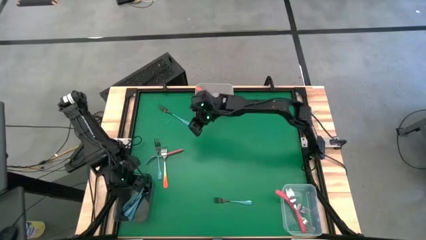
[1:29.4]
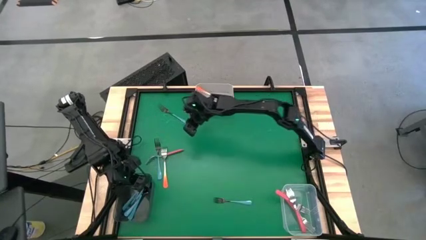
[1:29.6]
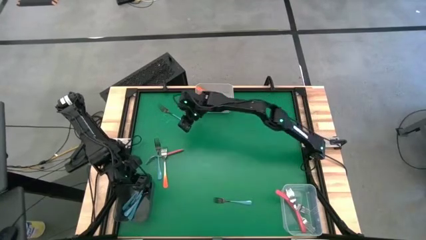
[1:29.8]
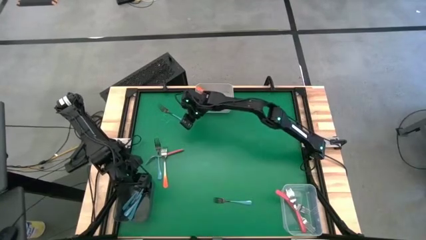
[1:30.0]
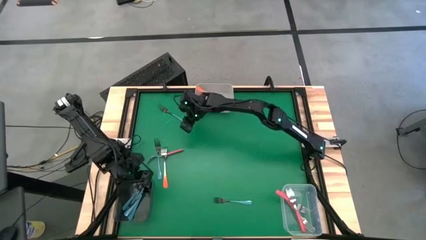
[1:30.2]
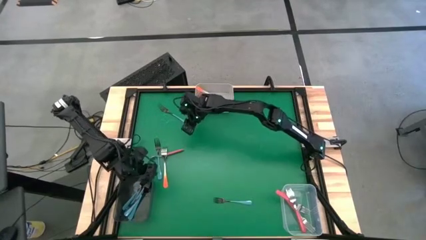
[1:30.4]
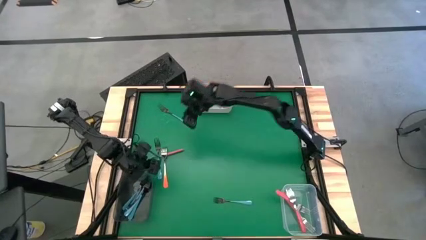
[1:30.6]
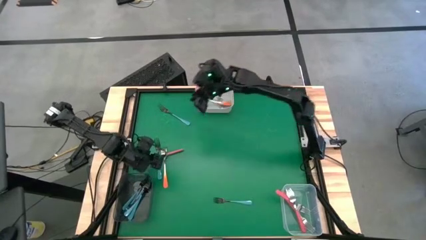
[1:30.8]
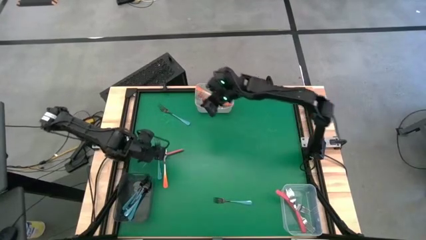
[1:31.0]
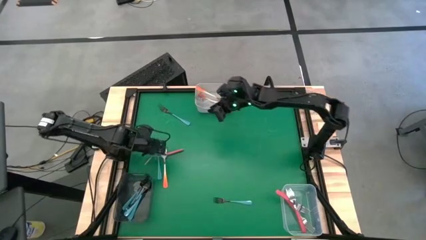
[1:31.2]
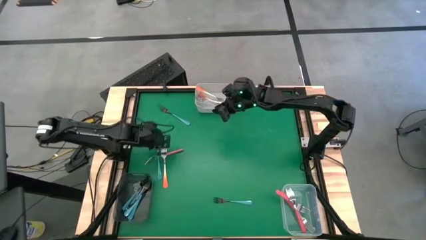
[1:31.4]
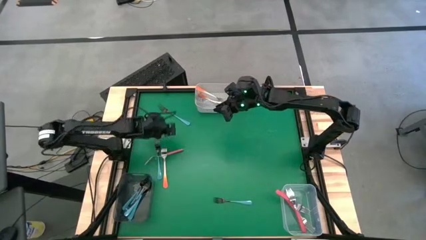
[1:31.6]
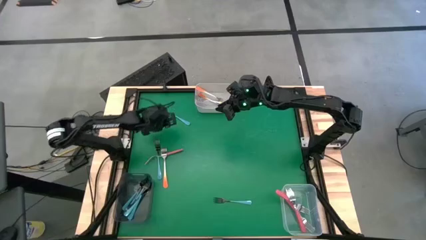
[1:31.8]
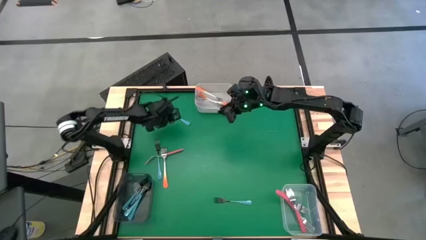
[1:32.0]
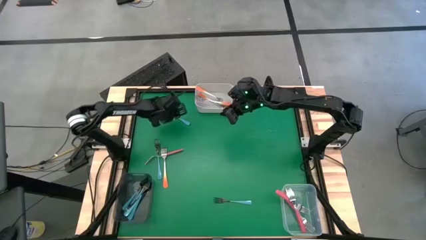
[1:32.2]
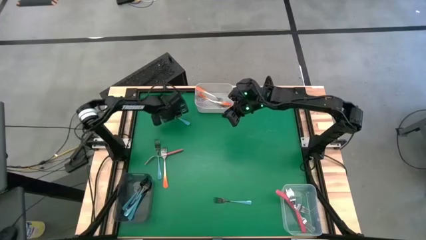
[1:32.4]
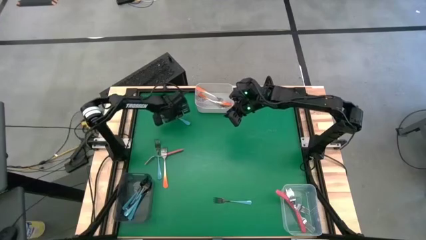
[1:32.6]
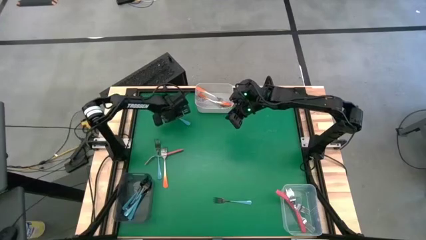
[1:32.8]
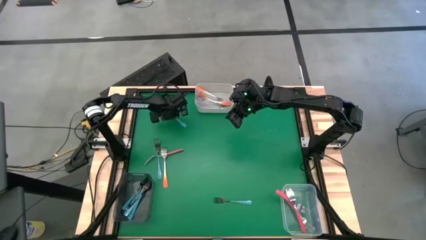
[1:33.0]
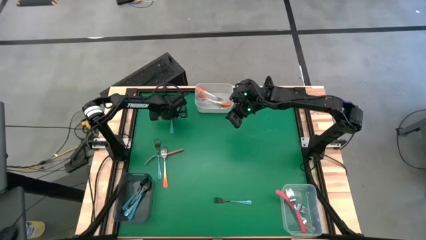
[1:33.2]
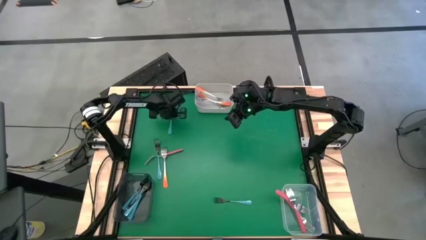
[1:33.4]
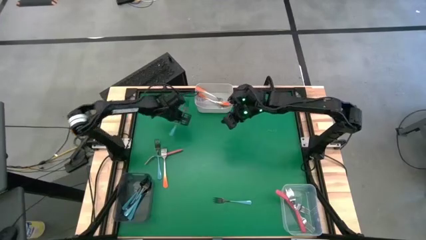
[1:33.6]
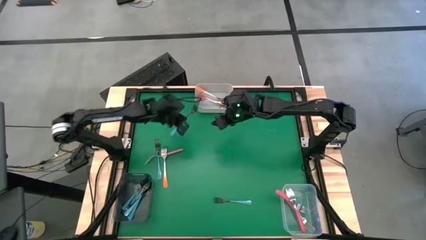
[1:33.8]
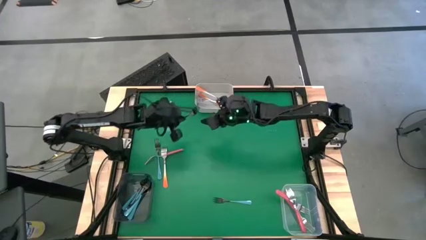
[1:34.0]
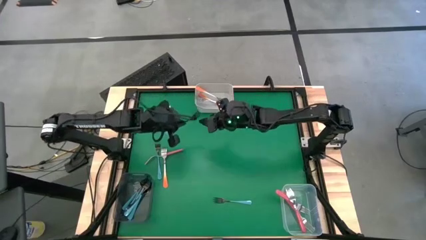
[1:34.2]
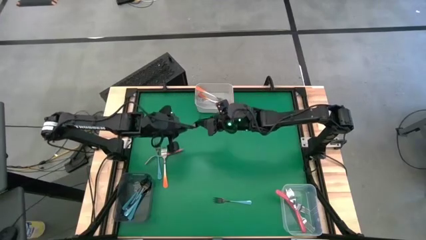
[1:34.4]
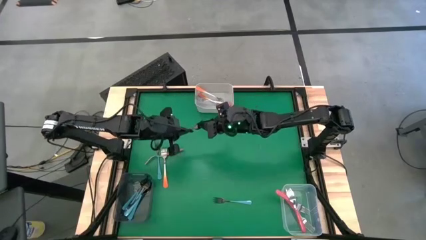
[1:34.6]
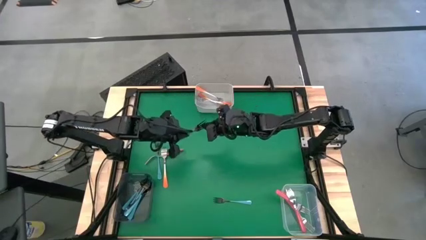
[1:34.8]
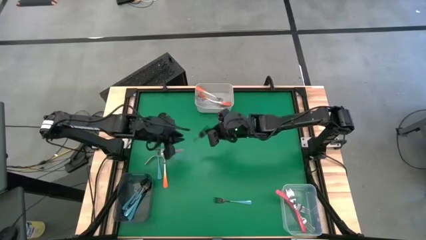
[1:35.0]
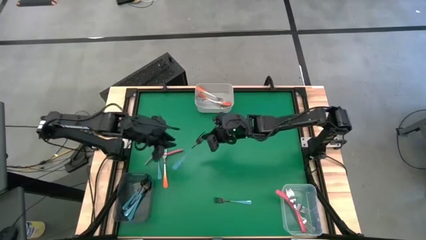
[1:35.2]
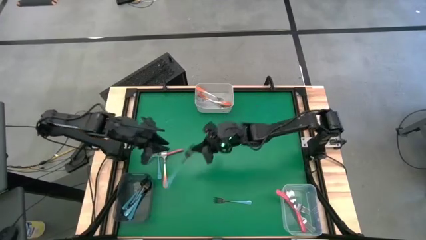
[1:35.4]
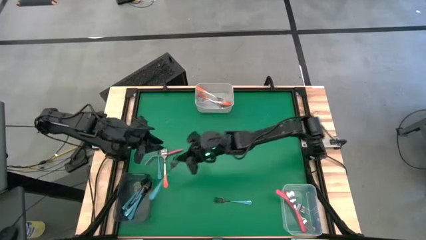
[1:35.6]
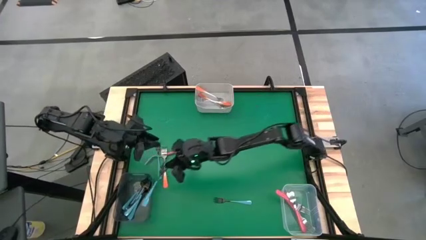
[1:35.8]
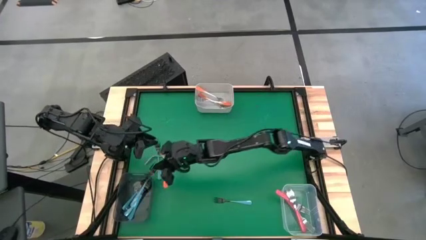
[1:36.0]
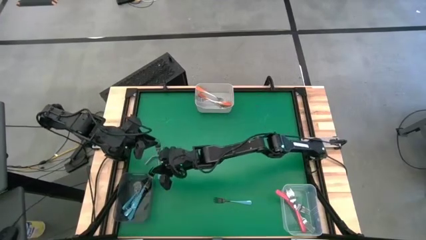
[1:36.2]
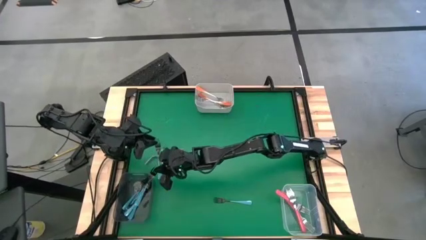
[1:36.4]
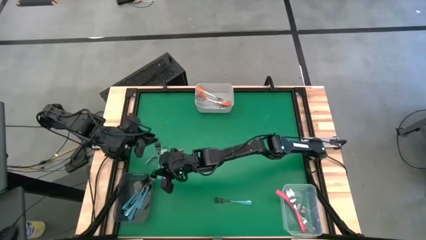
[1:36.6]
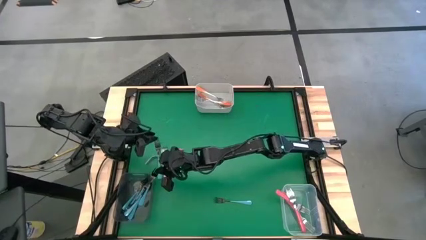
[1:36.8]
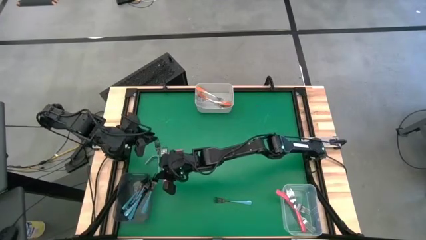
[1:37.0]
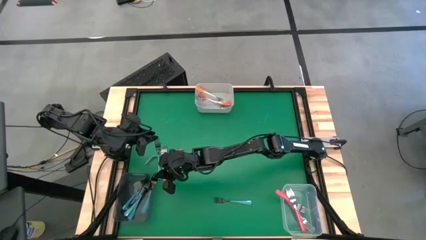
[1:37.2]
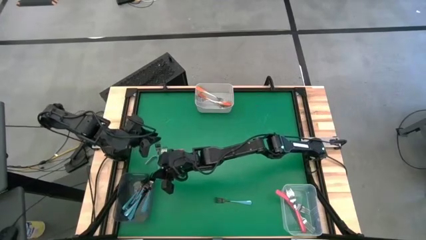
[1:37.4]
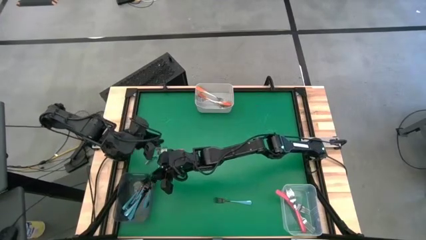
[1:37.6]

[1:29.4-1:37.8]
Task: Sort silverware by color (type)
Put the blue fork into the black transparent bin

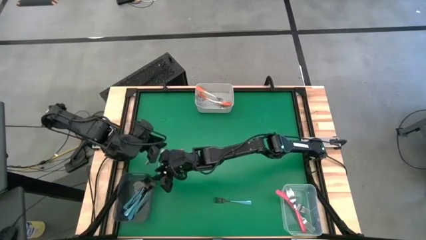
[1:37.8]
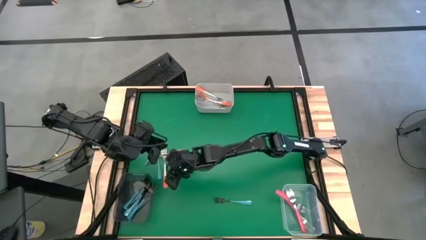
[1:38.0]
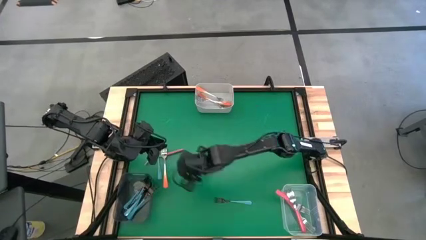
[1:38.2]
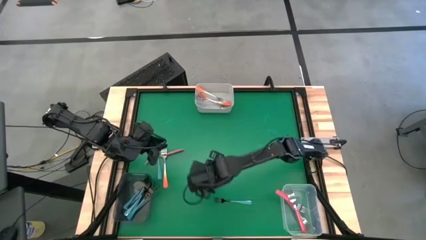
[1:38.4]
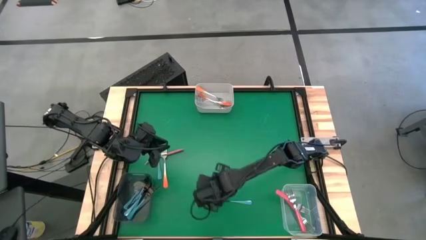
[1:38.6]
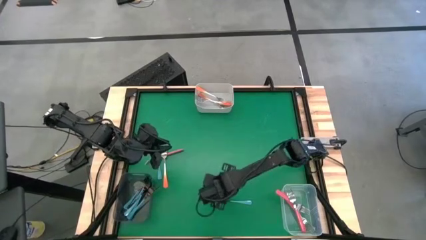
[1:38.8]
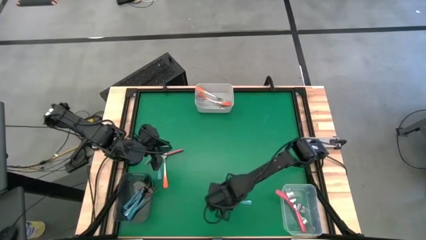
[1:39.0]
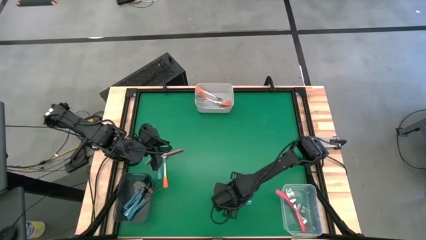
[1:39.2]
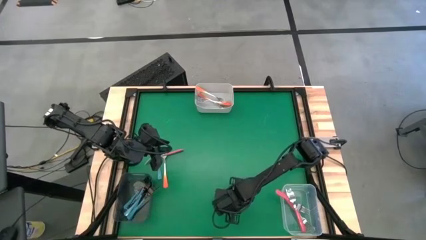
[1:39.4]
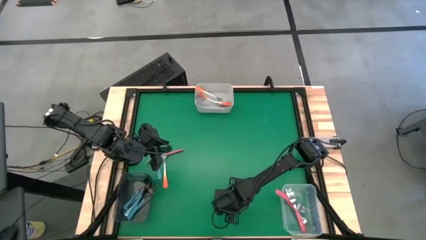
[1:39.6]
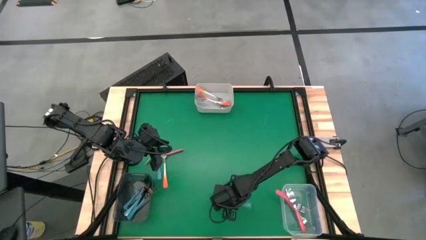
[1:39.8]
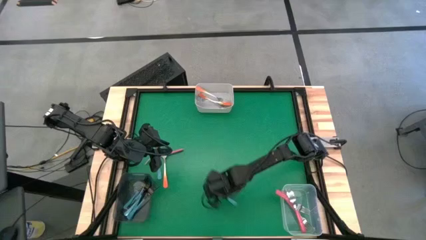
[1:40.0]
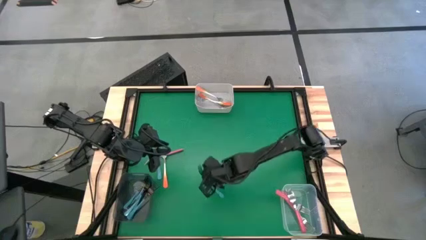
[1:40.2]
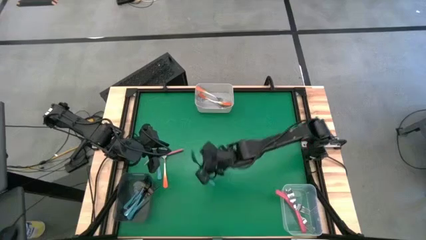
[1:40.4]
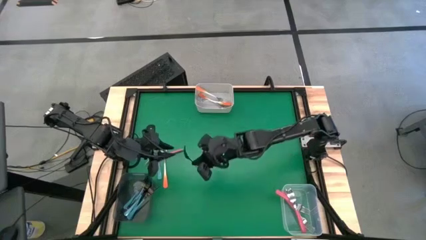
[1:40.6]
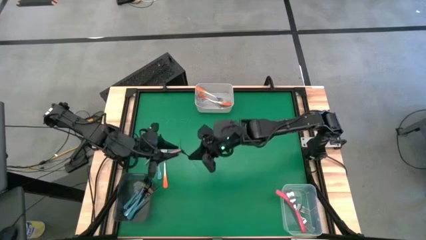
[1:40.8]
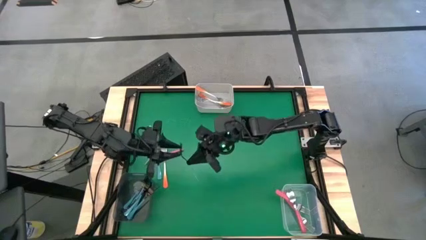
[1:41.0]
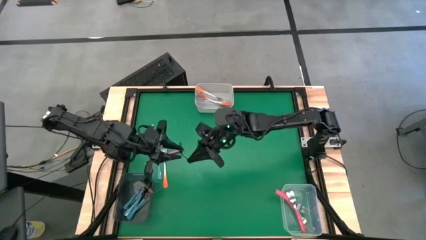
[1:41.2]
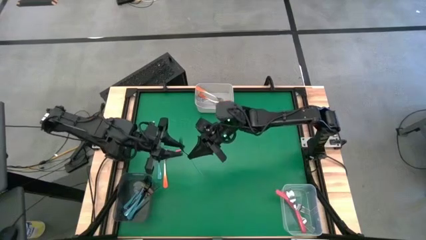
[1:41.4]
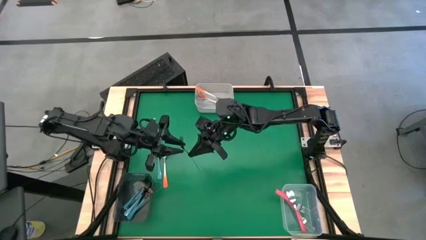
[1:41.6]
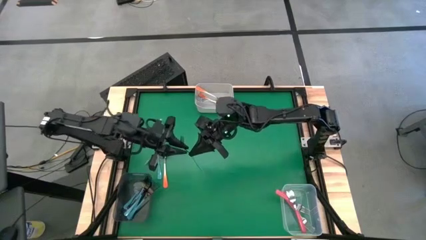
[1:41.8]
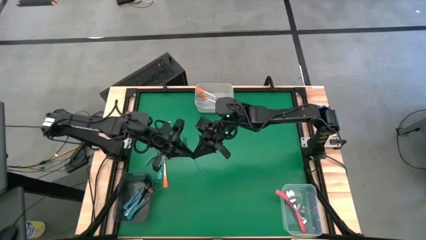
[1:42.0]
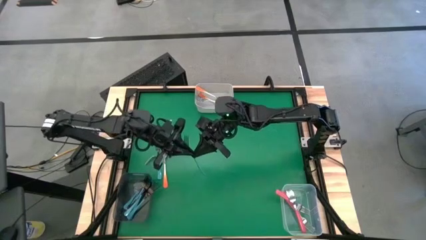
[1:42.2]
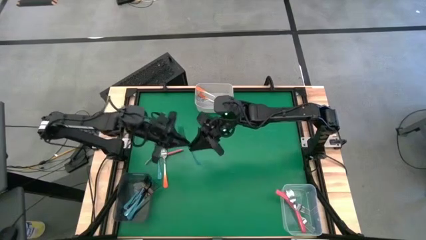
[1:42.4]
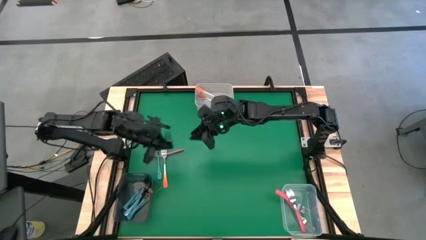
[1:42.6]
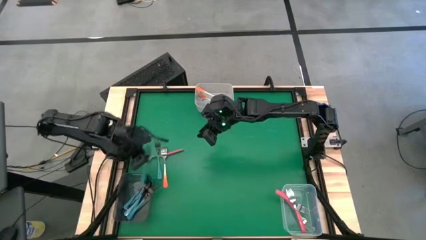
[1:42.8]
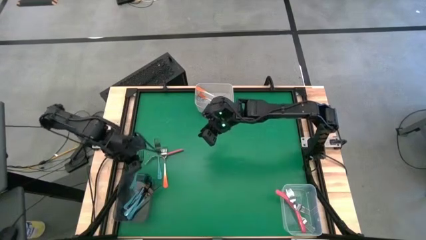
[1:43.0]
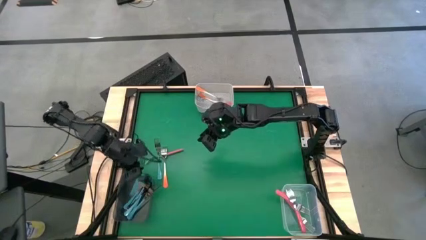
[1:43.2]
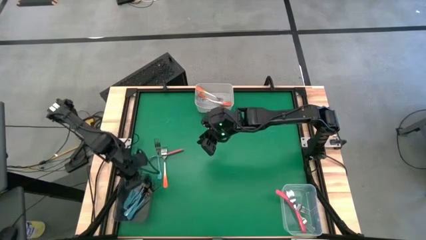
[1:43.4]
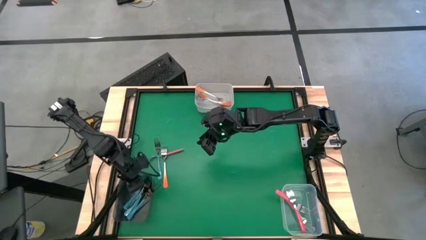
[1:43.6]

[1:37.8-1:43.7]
Put the blue fork into the black transparent bin

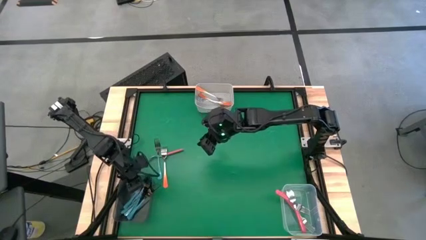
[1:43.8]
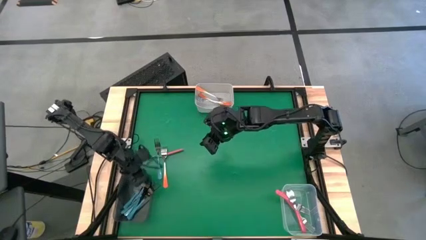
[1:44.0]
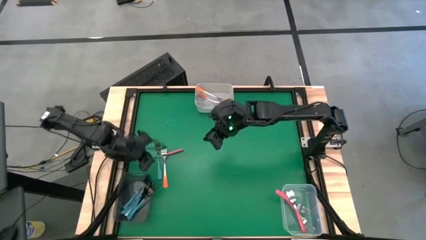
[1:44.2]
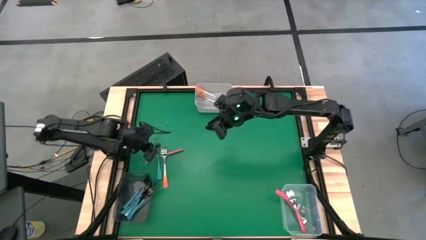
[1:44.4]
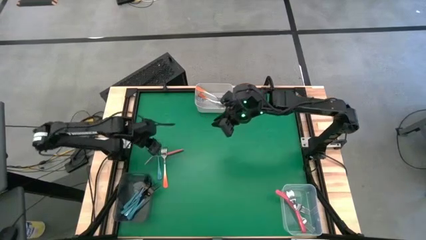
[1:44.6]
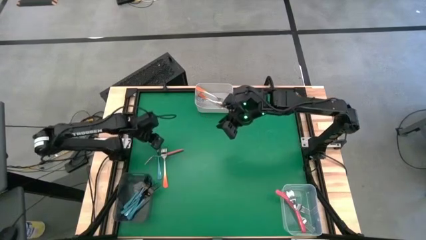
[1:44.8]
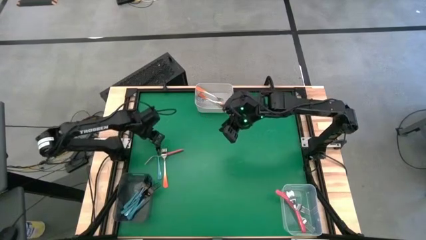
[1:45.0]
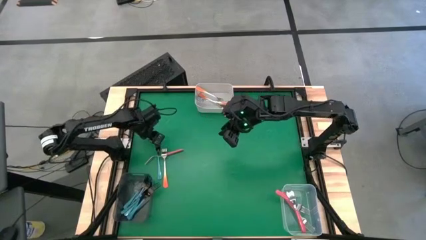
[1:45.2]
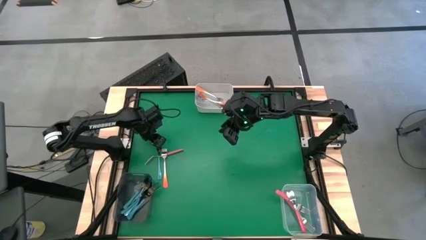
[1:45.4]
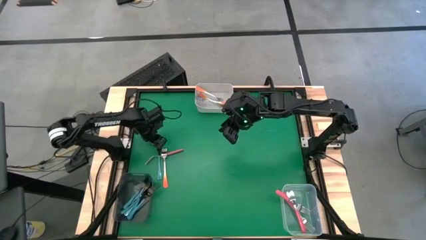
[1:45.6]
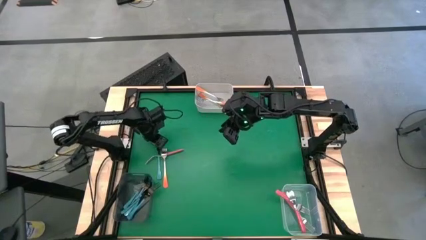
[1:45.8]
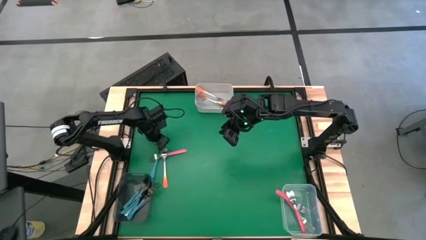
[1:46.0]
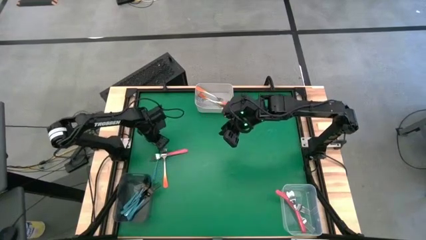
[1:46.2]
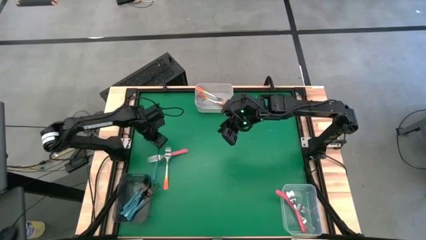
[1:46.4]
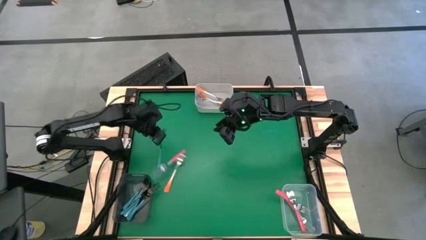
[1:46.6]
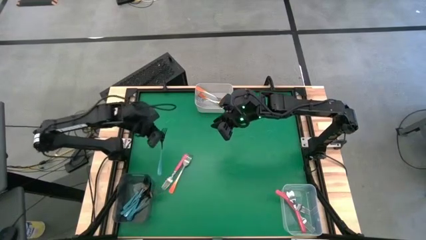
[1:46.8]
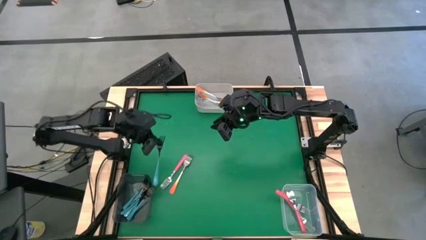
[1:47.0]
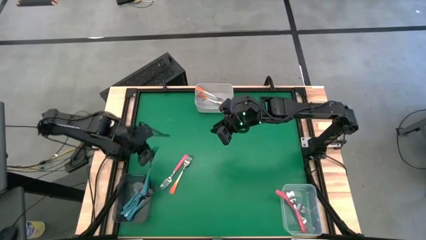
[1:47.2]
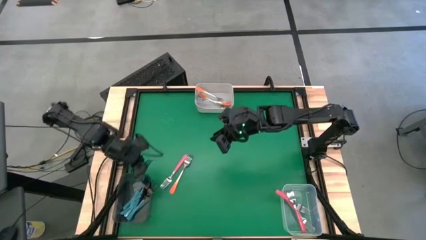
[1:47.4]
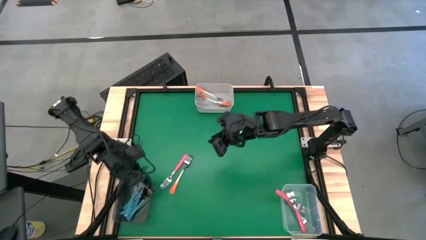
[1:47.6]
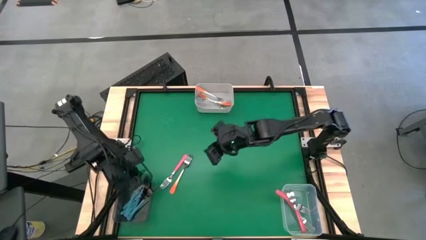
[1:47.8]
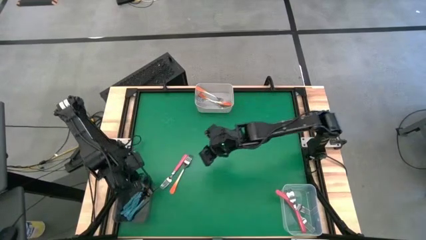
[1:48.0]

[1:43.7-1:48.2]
Put the blue fork into the black transparent bin
